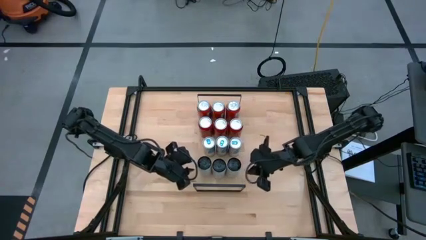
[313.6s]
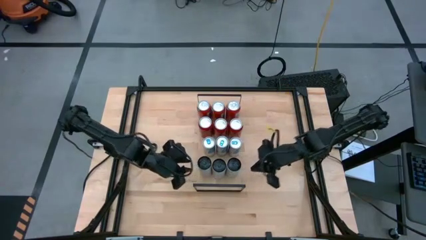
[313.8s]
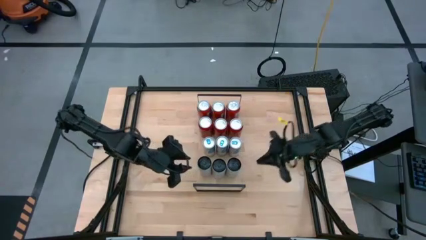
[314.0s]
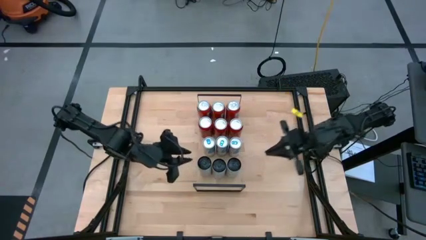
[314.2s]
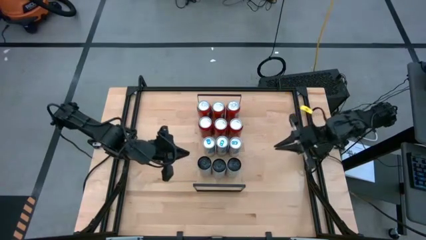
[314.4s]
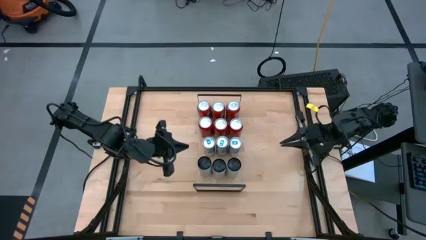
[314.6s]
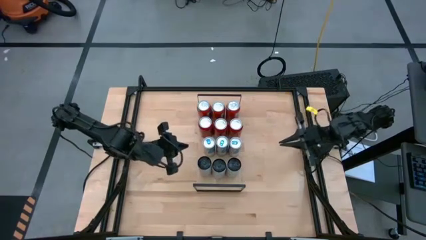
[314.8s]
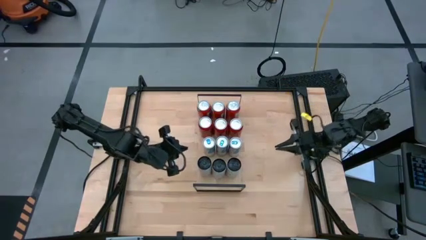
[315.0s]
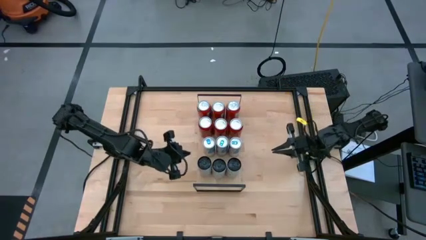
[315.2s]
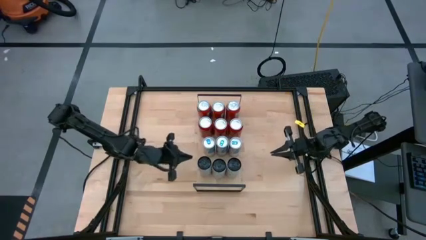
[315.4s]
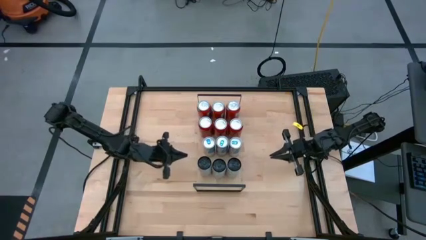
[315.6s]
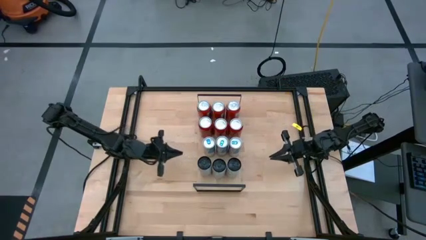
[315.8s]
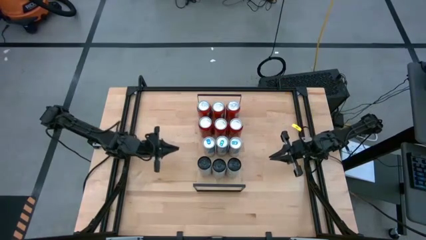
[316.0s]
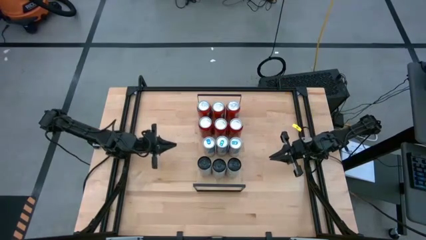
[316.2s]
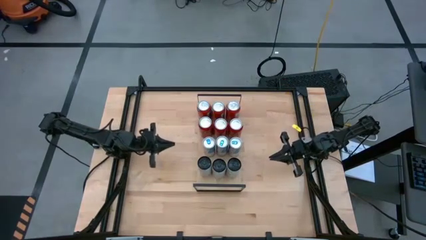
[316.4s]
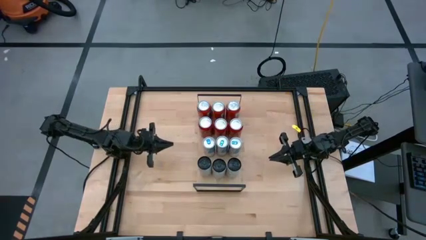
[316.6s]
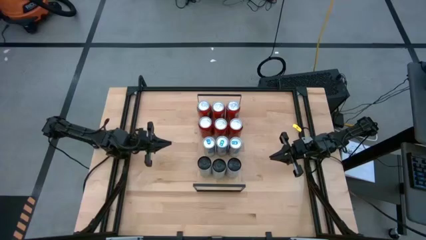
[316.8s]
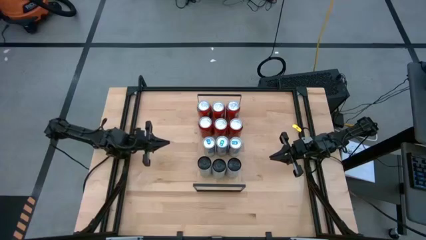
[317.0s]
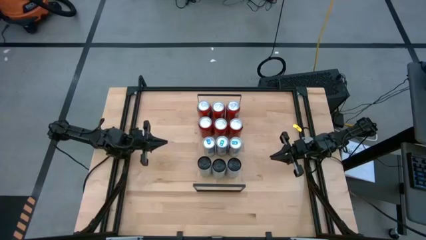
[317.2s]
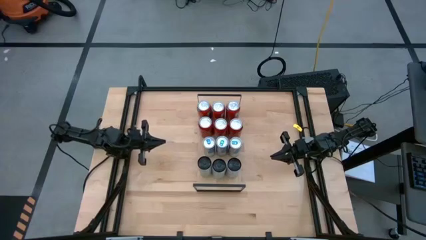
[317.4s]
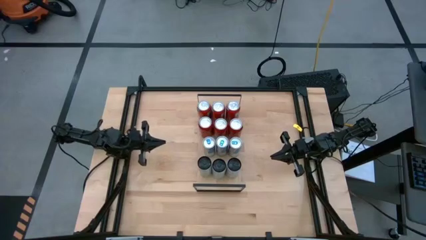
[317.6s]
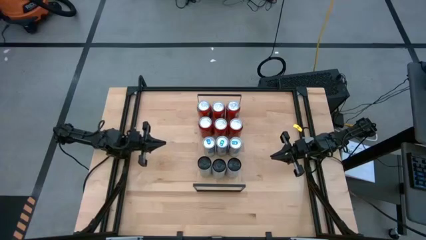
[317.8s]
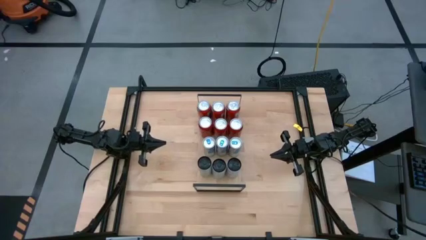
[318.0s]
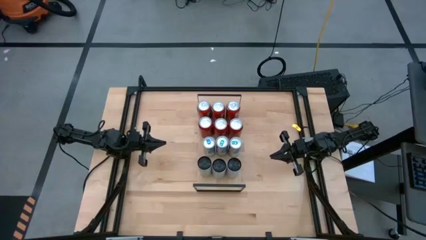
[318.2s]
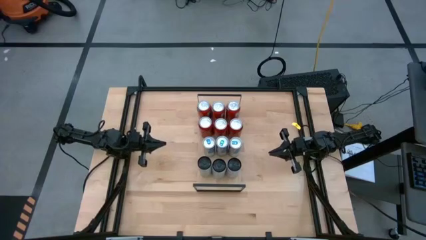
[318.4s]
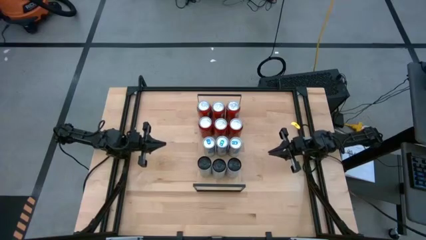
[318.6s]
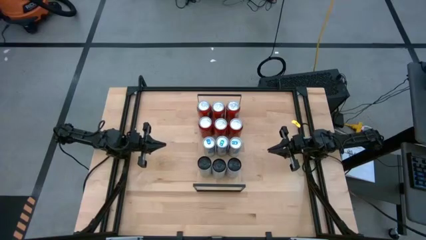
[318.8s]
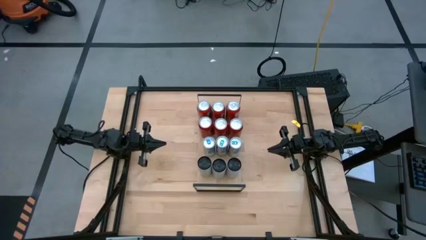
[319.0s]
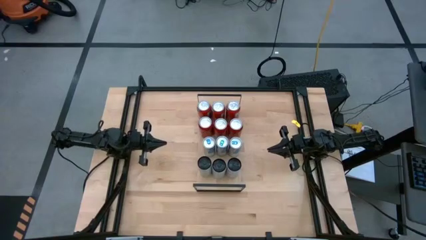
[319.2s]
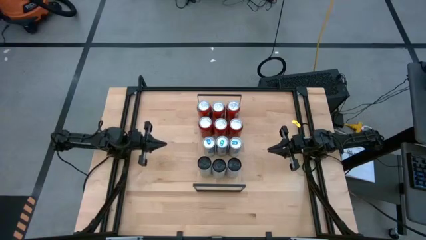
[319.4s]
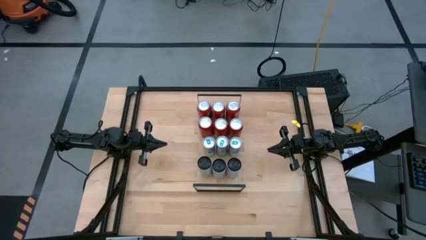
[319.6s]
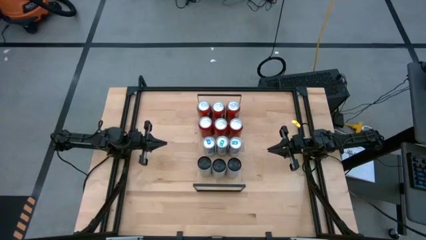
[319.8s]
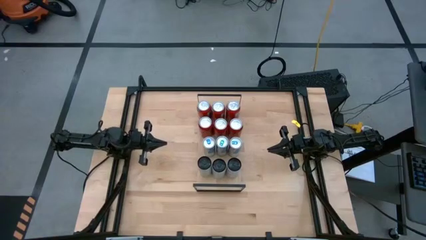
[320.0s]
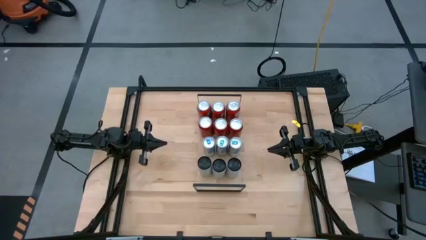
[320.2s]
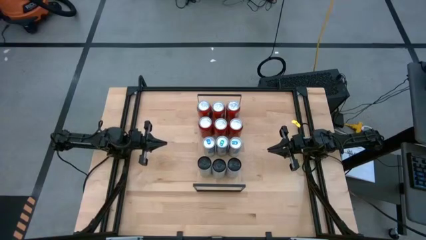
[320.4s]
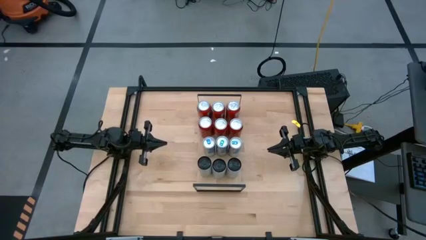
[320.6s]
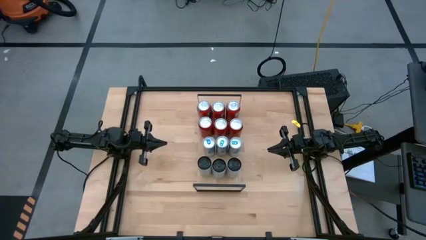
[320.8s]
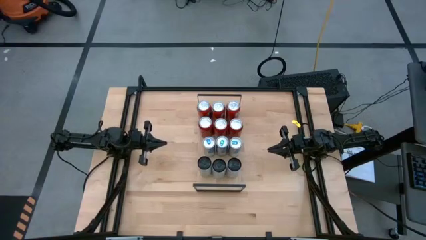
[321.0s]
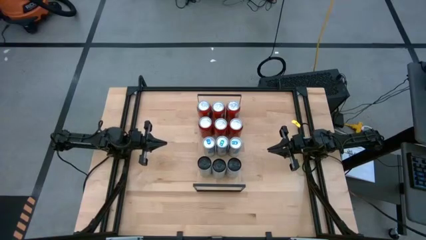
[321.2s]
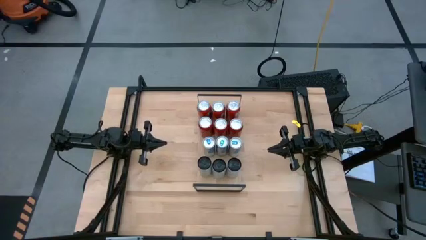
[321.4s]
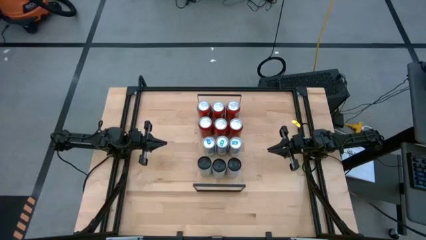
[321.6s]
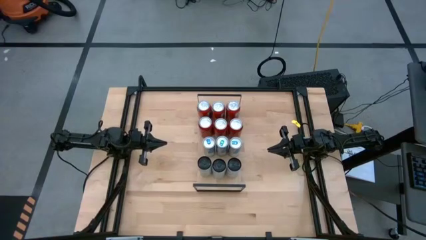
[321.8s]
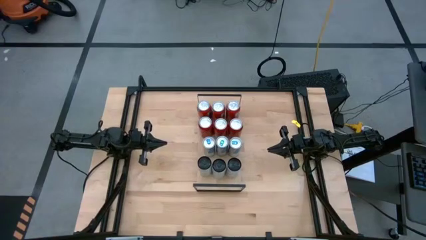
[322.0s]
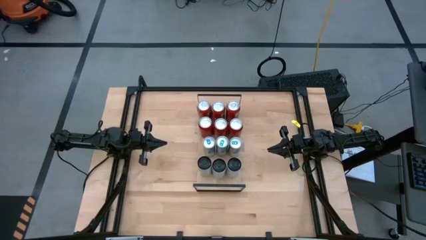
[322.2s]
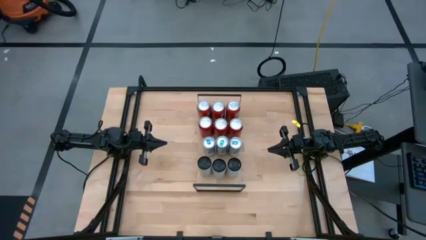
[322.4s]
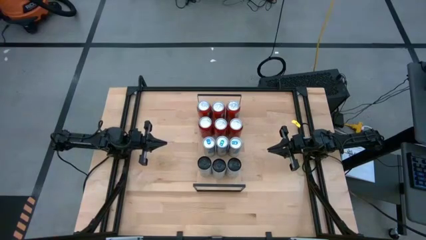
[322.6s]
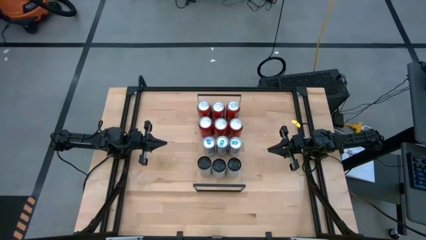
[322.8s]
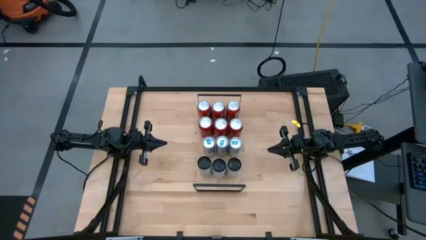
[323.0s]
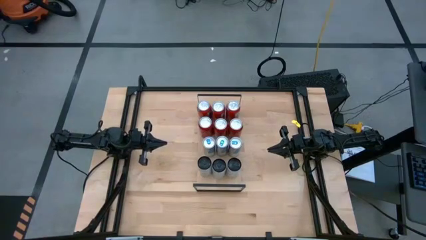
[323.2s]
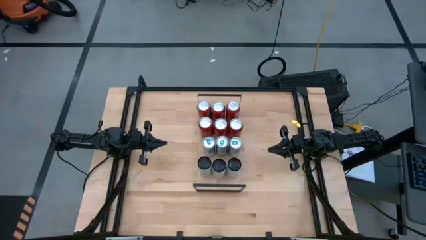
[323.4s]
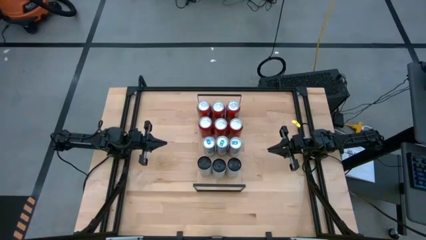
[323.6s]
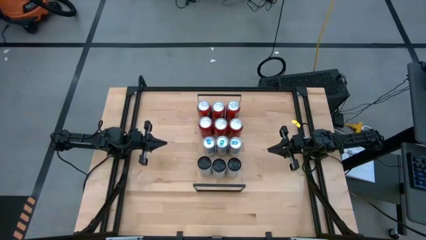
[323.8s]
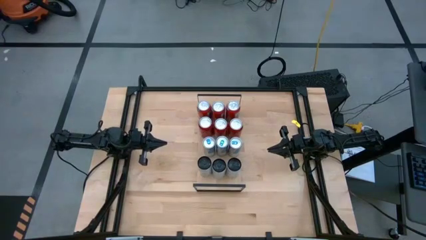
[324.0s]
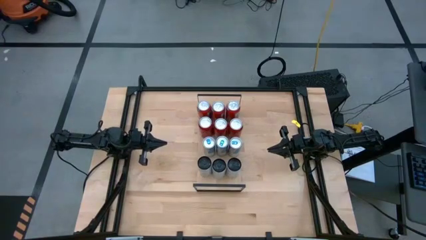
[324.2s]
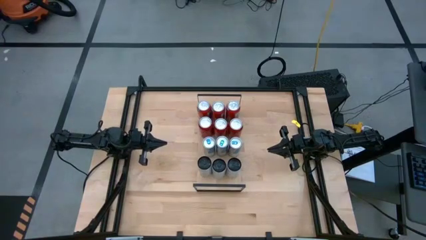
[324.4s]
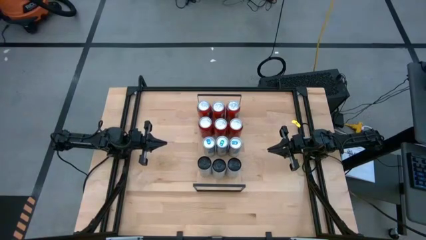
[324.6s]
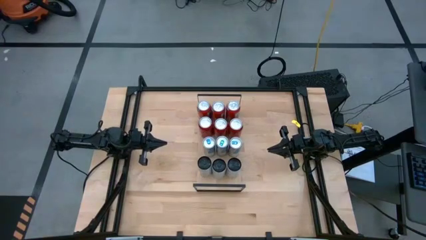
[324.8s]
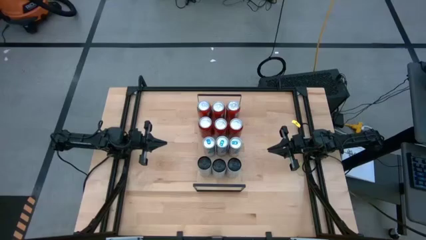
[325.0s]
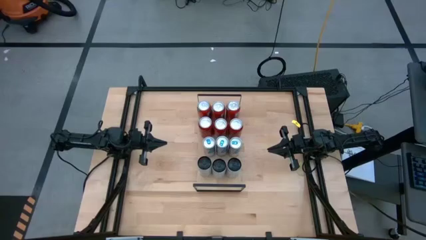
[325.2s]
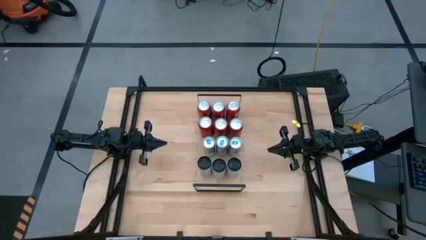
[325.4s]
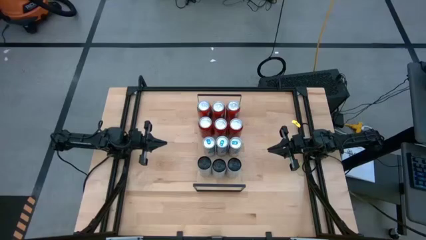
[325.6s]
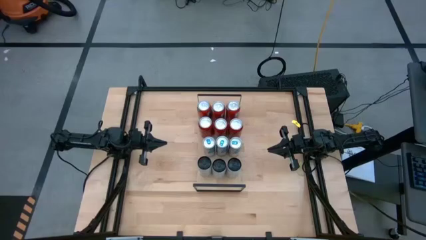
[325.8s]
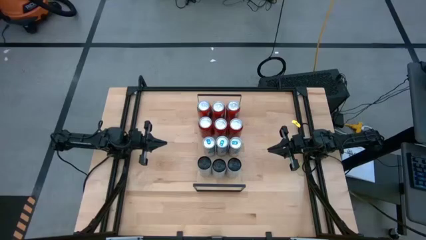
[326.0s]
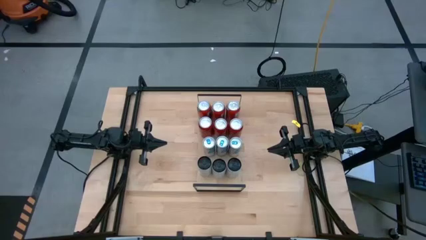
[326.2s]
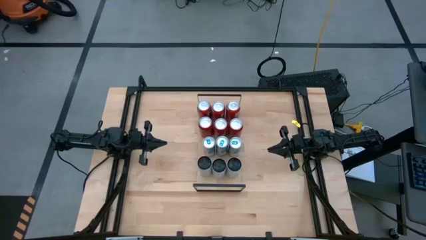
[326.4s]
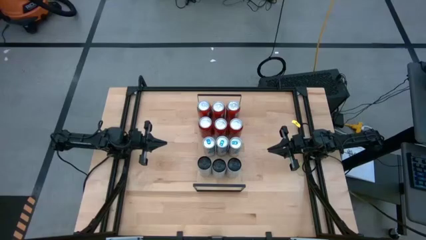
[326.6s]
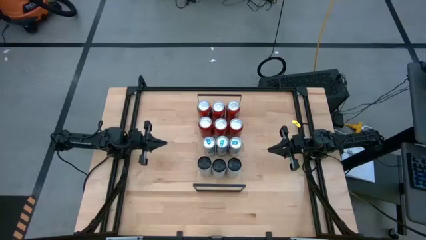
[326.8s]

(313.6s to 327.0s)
Task: Place canned beverage on shelf
Return to Home Position

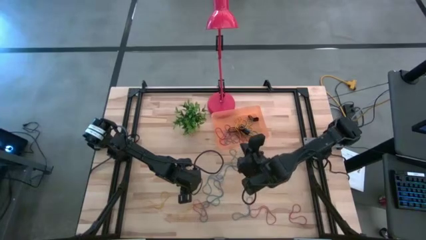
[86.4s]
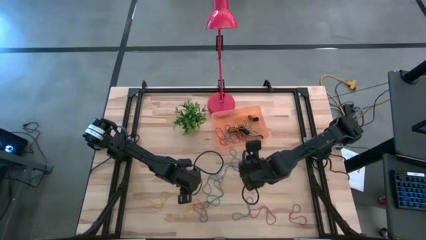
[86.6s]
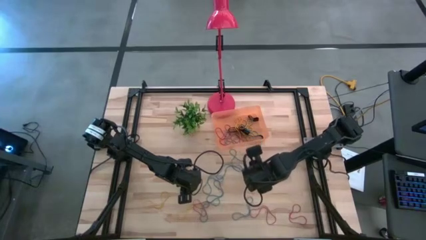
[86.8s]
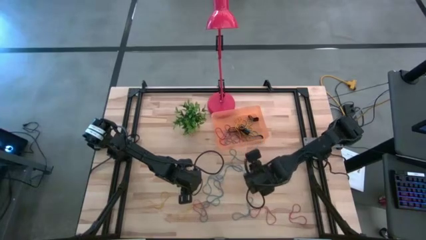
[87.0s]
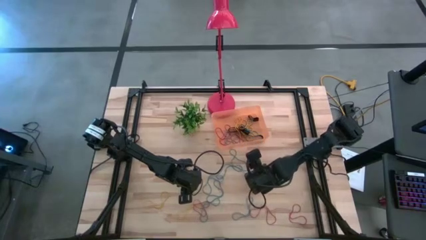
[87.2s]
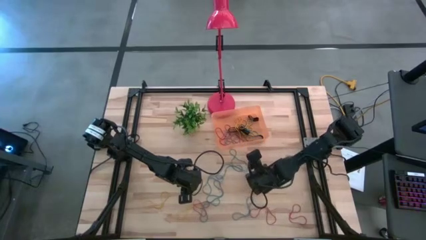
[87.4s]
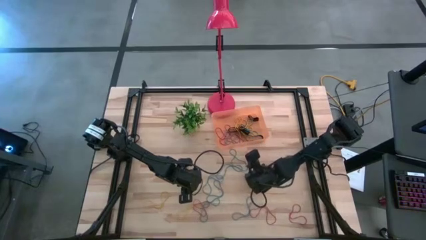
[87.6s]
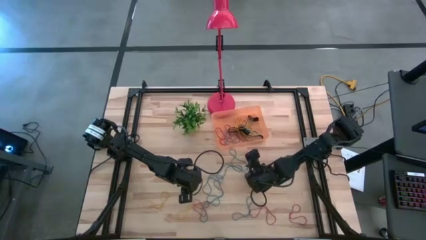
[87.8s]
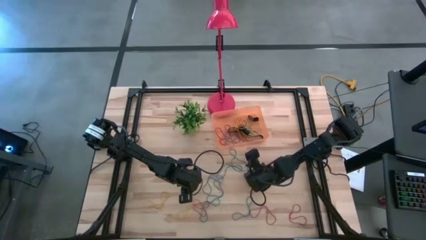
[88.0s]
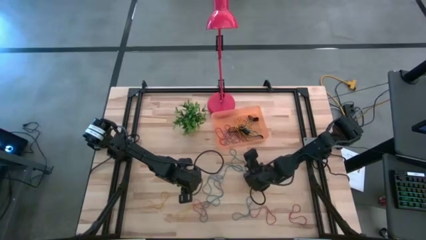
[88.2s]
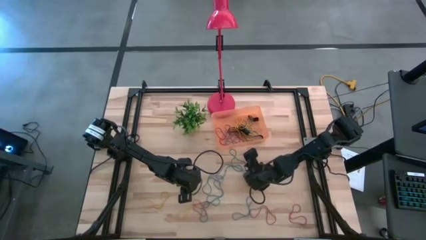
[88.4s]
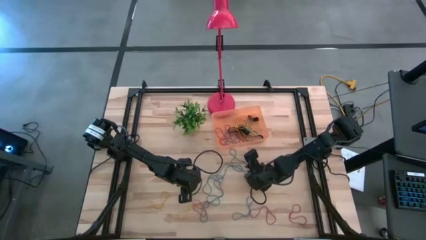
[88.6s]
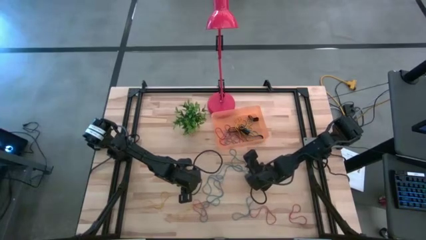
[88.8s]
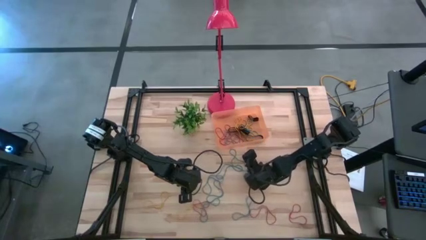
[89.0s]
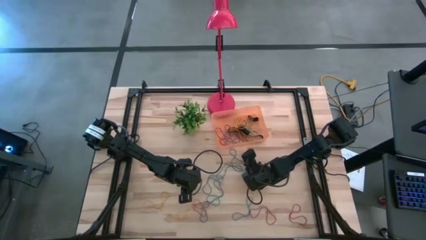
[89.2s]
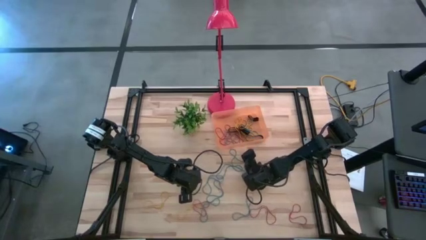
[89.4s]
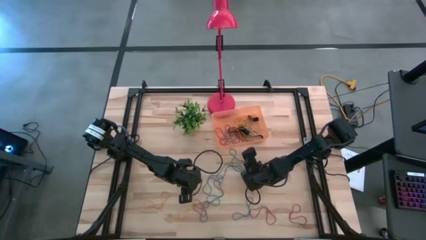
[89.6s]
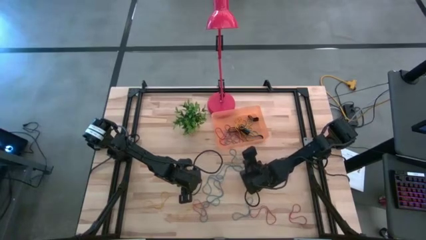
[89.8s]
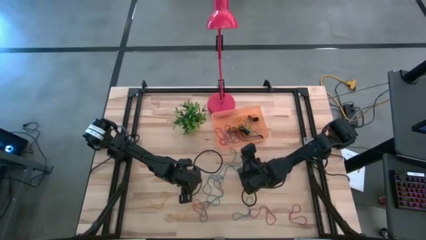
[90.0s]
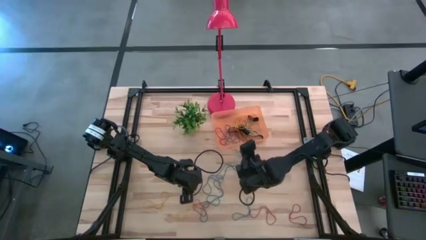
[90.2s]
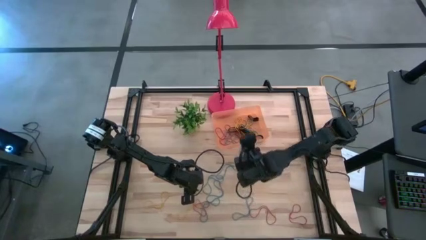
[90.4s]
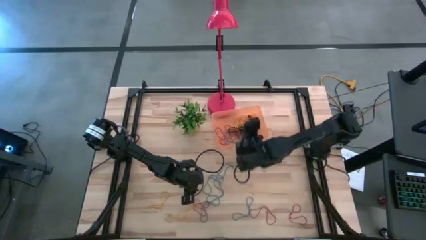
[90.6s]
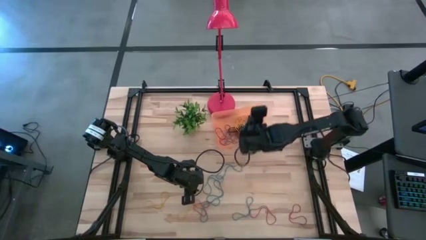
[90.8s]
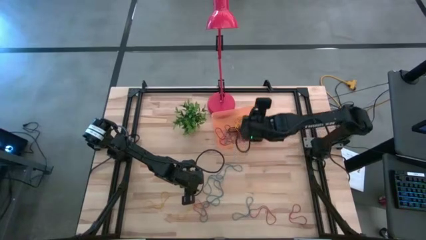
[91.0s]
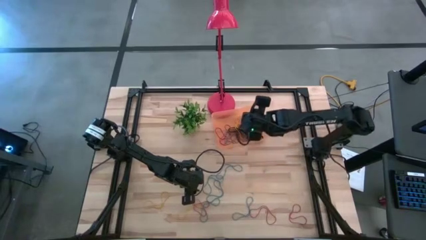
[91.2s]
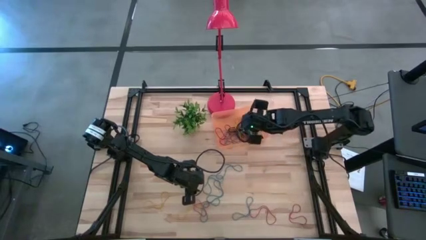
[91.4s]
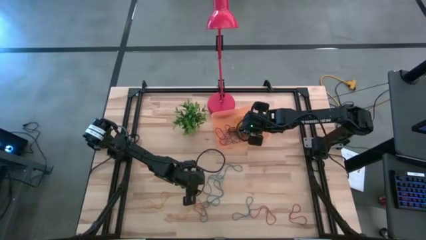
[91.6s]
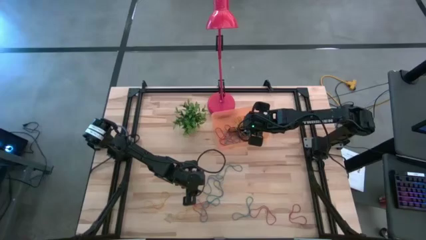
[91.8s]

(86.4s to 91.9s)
Task: Pick and place rubber bands into bin
Put the blue rubberband into the orange container
